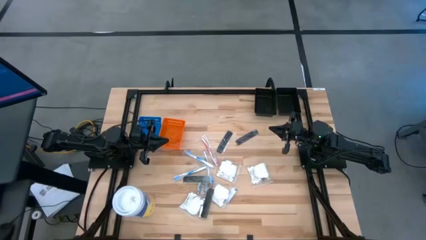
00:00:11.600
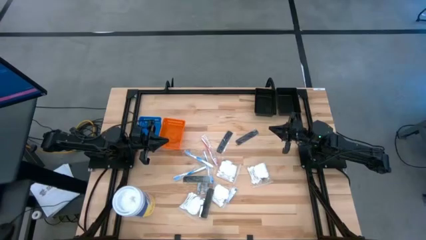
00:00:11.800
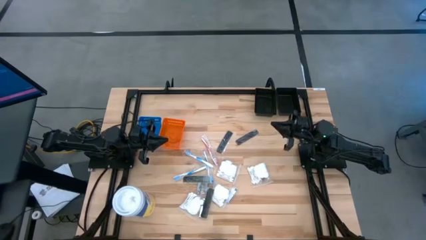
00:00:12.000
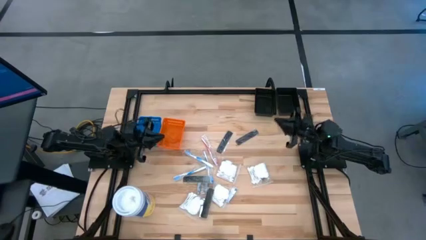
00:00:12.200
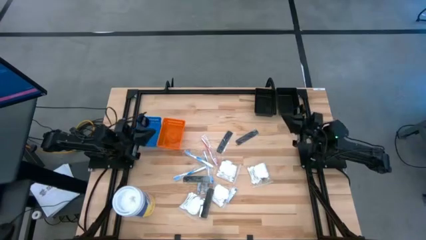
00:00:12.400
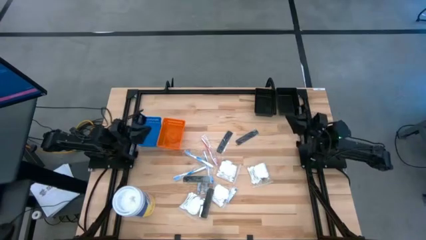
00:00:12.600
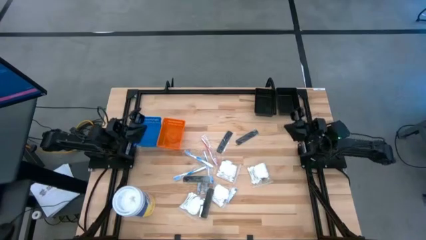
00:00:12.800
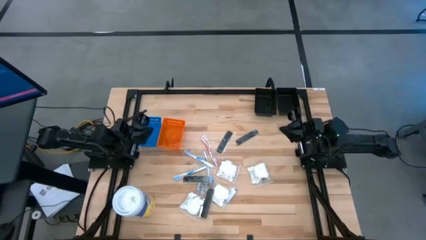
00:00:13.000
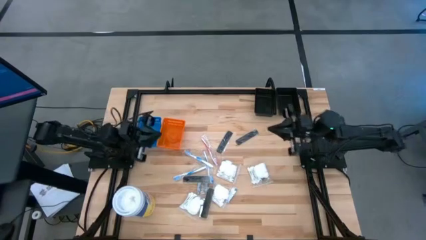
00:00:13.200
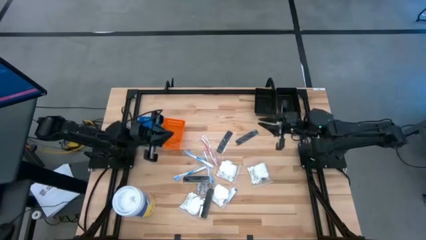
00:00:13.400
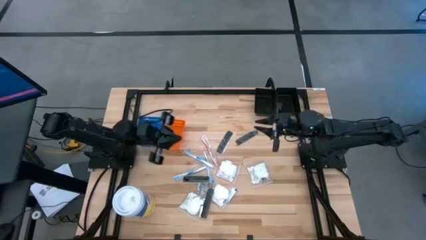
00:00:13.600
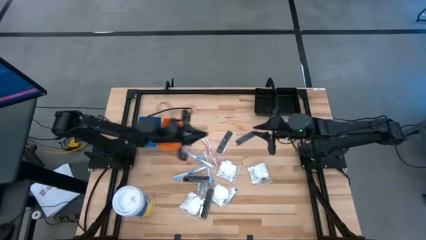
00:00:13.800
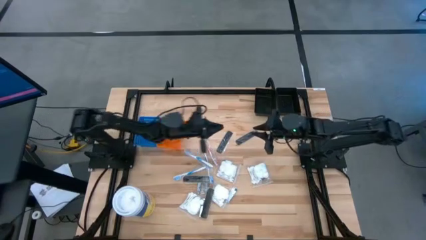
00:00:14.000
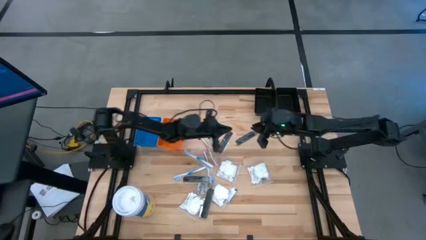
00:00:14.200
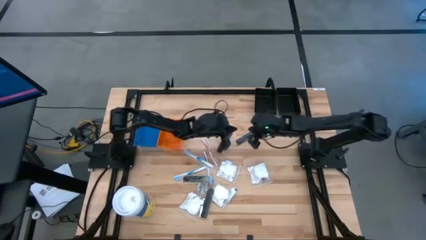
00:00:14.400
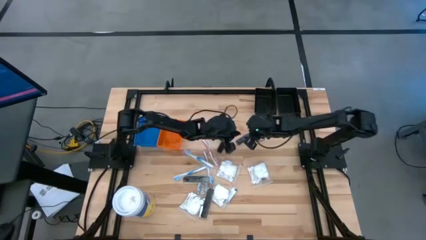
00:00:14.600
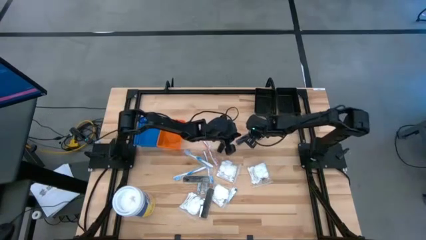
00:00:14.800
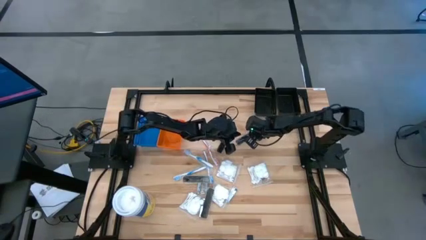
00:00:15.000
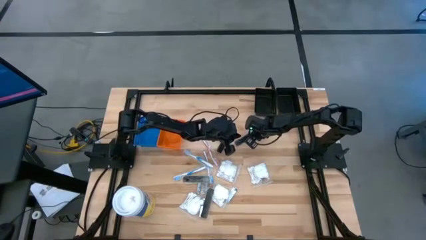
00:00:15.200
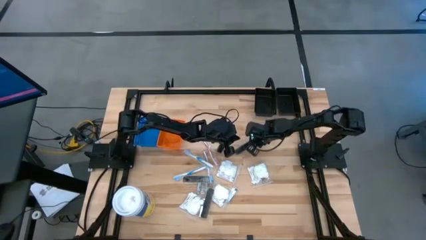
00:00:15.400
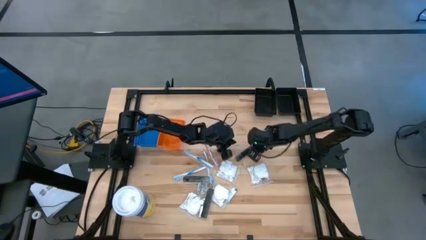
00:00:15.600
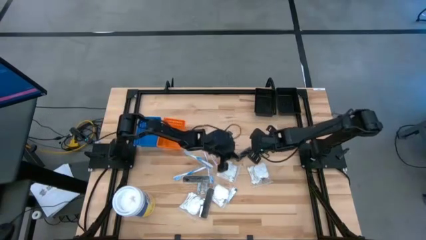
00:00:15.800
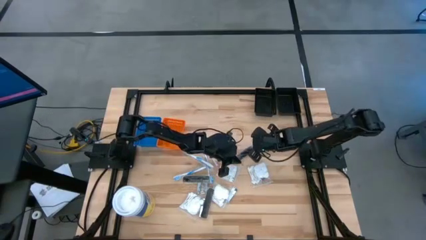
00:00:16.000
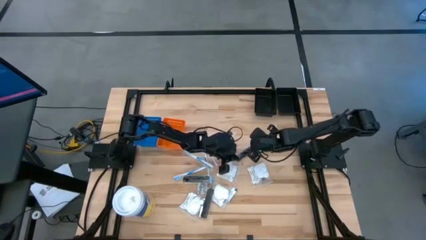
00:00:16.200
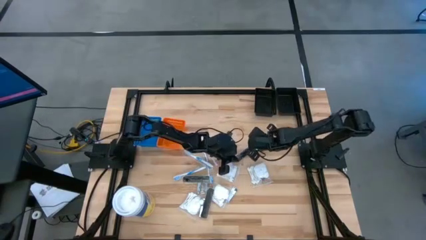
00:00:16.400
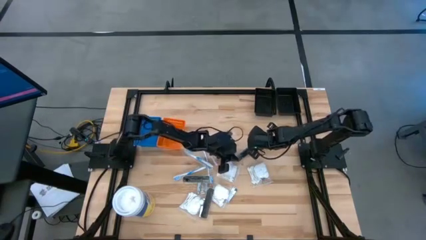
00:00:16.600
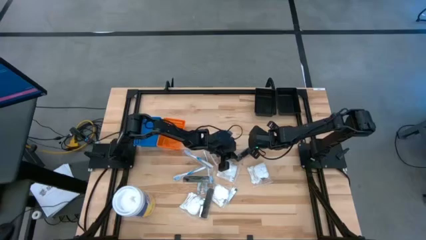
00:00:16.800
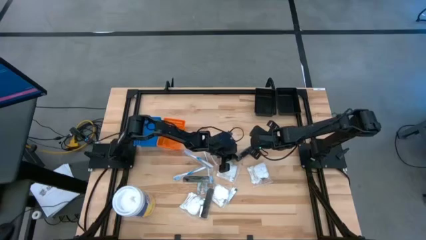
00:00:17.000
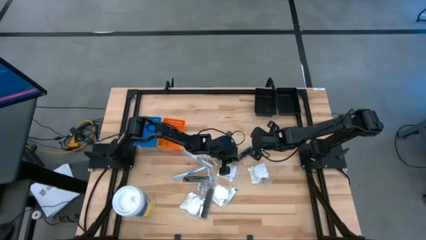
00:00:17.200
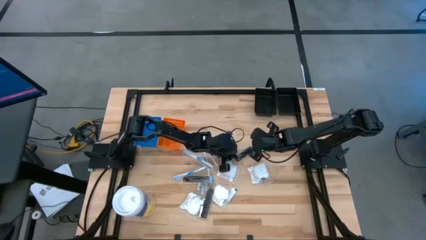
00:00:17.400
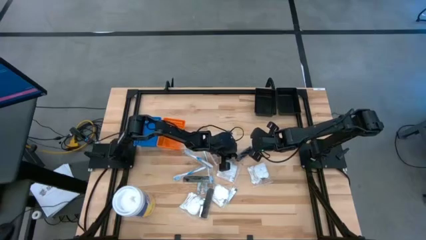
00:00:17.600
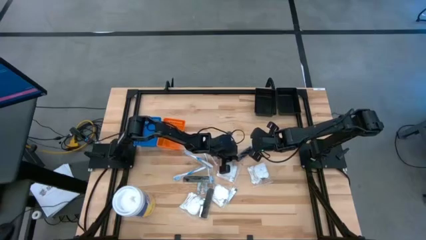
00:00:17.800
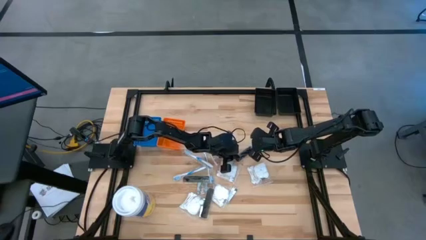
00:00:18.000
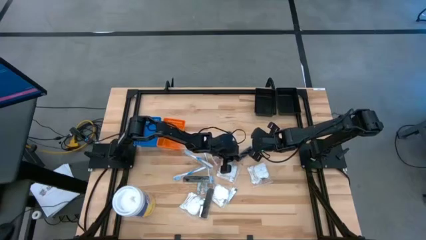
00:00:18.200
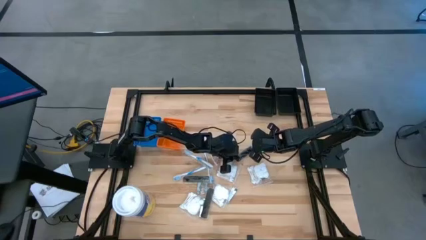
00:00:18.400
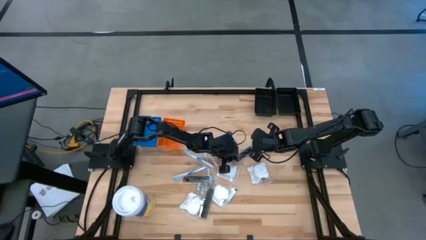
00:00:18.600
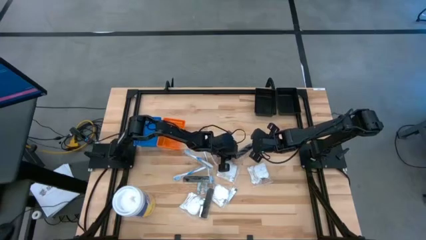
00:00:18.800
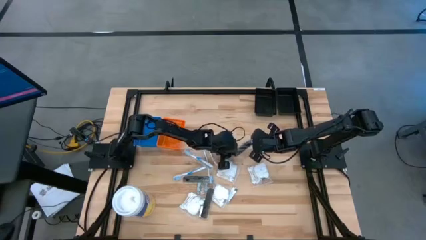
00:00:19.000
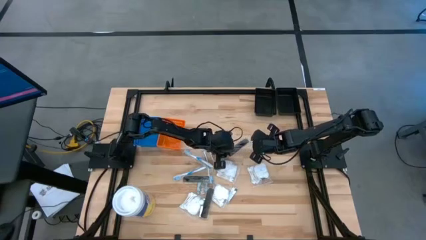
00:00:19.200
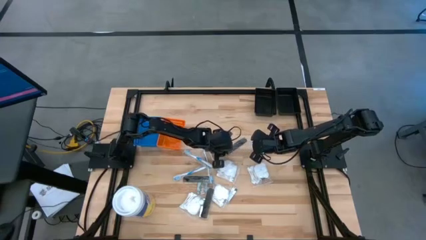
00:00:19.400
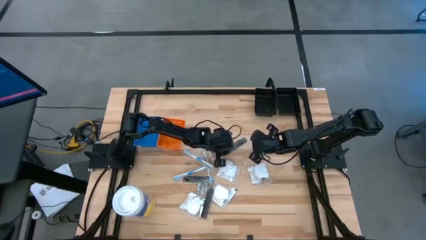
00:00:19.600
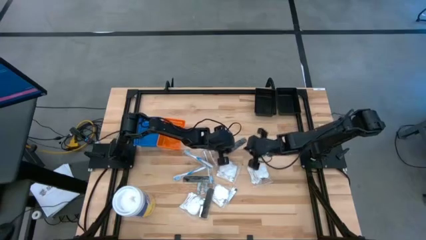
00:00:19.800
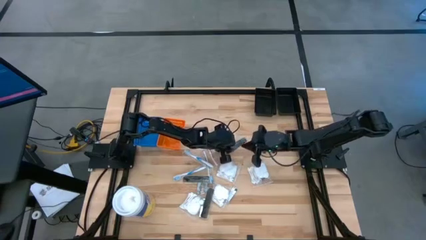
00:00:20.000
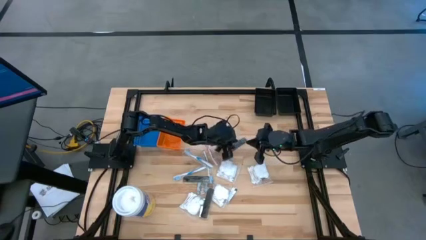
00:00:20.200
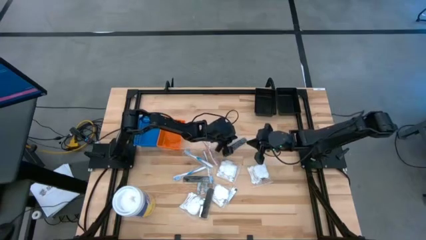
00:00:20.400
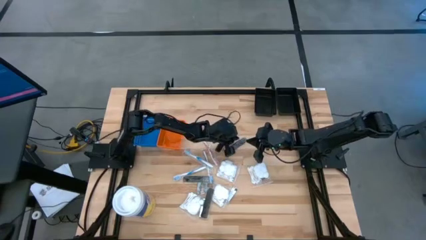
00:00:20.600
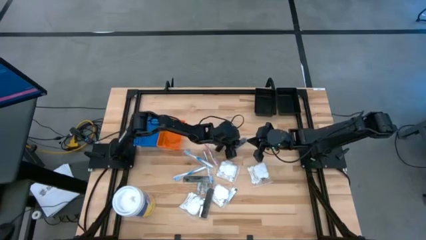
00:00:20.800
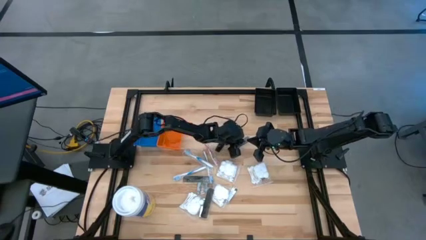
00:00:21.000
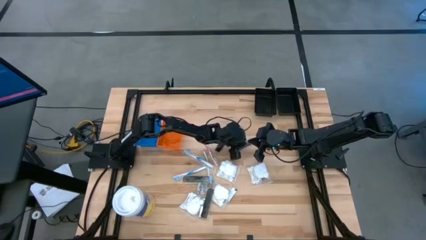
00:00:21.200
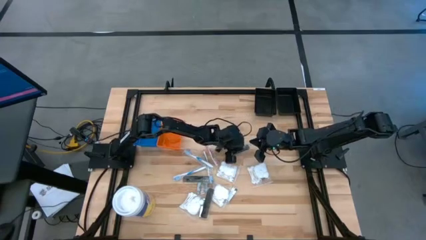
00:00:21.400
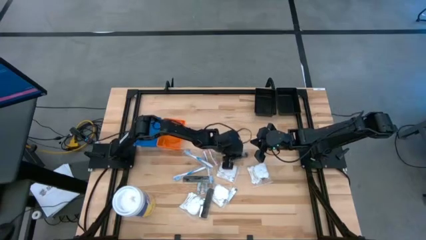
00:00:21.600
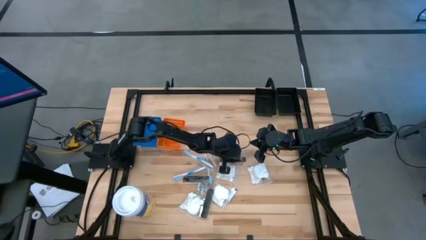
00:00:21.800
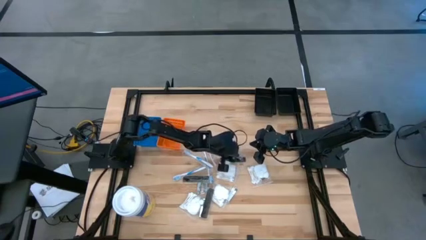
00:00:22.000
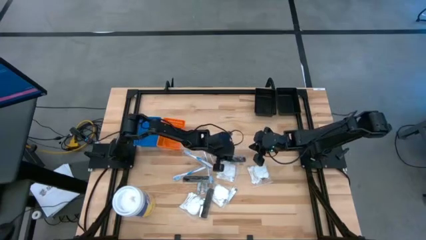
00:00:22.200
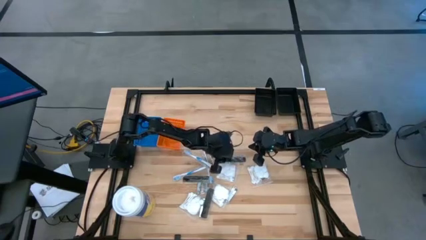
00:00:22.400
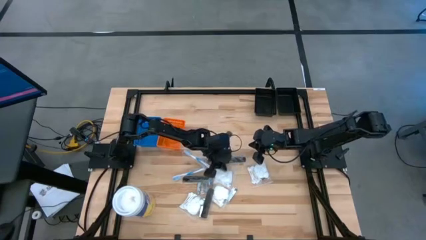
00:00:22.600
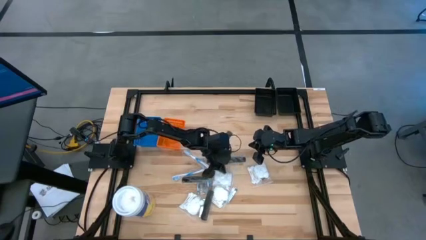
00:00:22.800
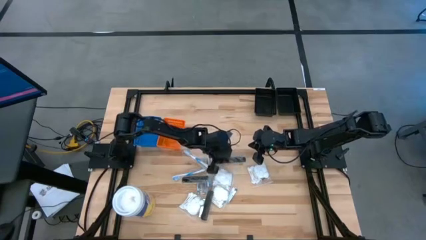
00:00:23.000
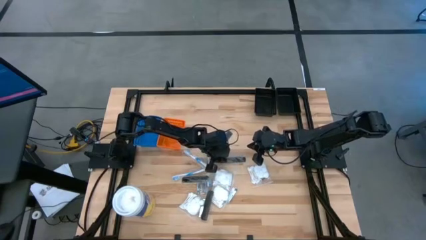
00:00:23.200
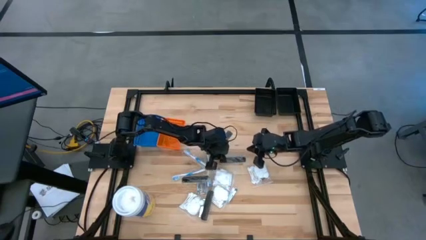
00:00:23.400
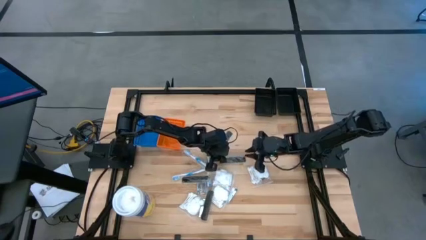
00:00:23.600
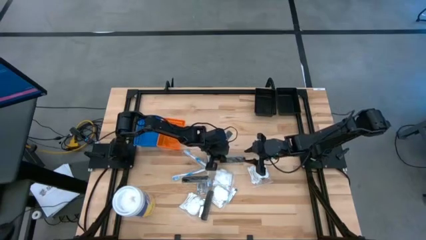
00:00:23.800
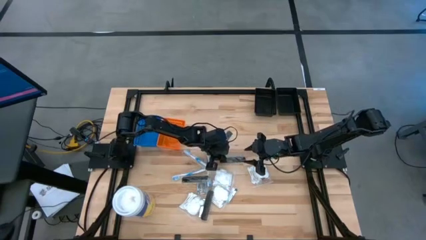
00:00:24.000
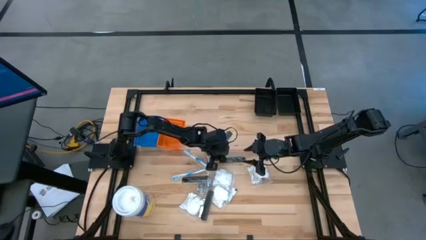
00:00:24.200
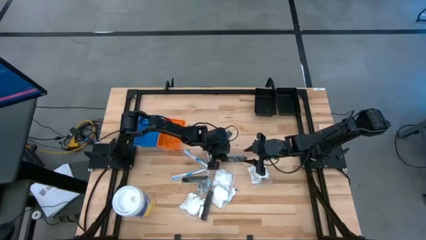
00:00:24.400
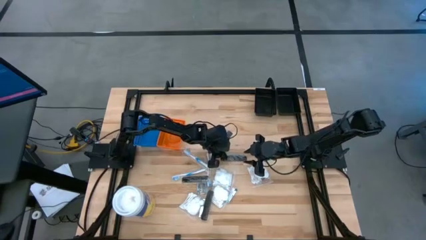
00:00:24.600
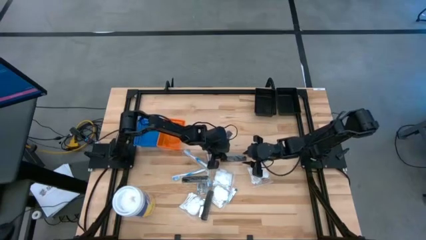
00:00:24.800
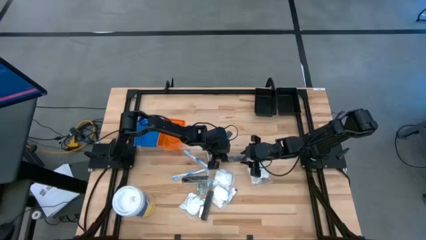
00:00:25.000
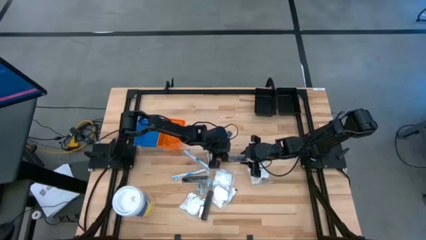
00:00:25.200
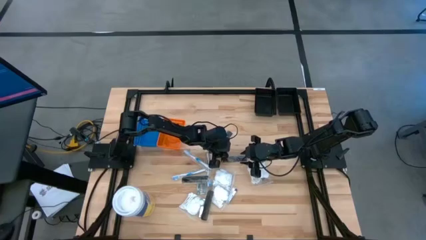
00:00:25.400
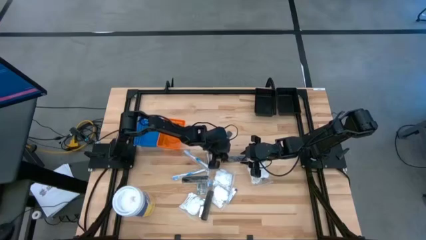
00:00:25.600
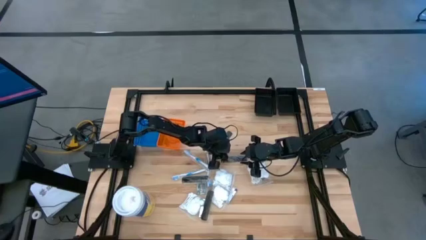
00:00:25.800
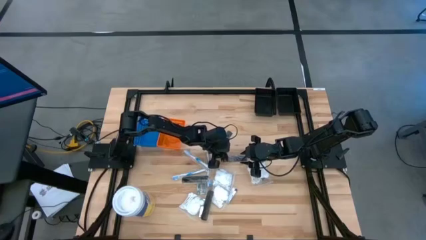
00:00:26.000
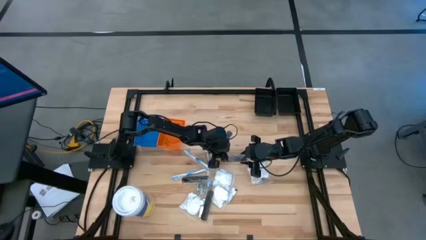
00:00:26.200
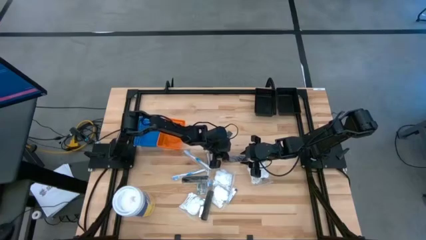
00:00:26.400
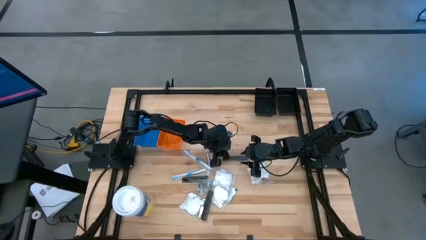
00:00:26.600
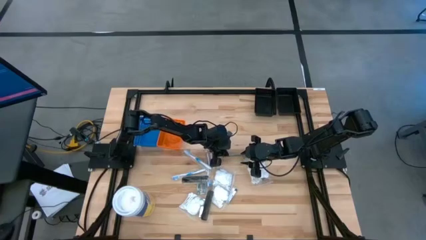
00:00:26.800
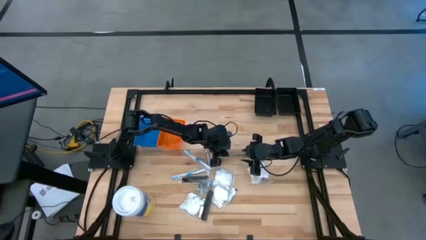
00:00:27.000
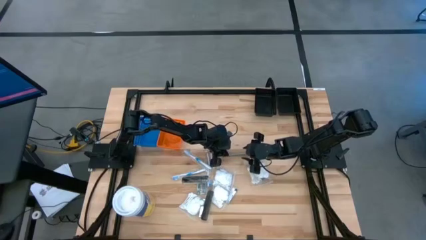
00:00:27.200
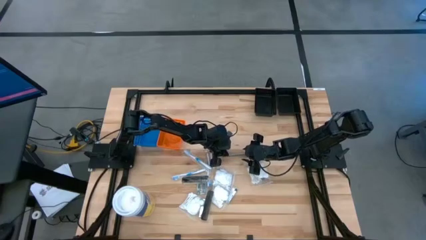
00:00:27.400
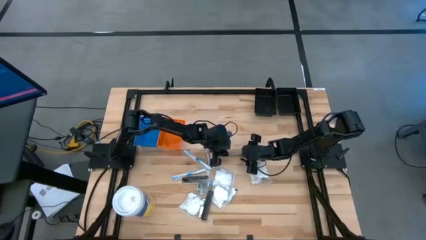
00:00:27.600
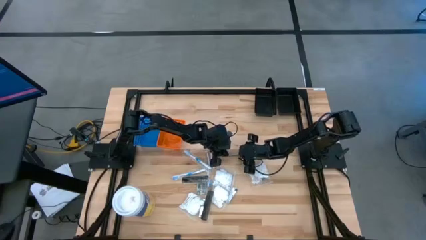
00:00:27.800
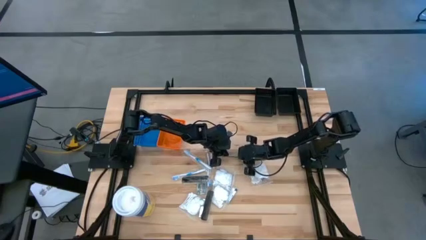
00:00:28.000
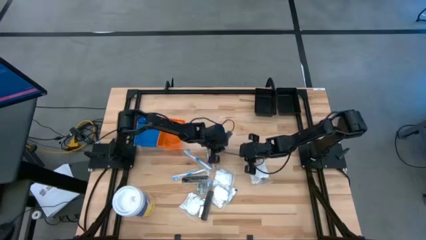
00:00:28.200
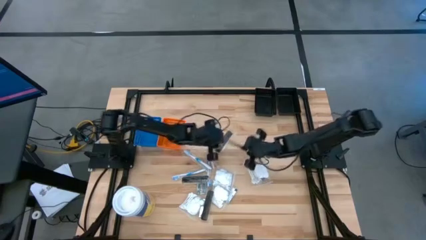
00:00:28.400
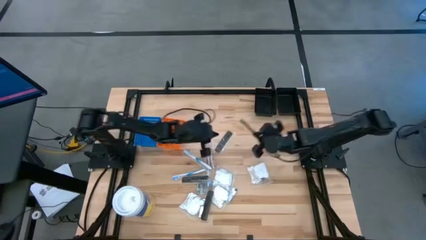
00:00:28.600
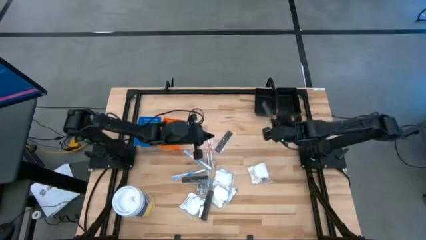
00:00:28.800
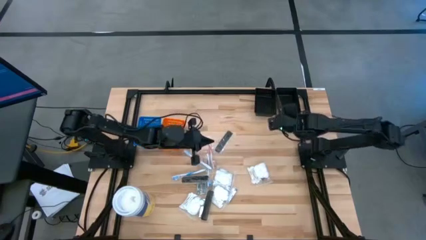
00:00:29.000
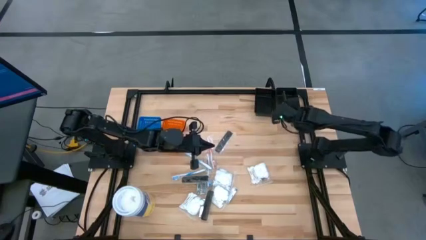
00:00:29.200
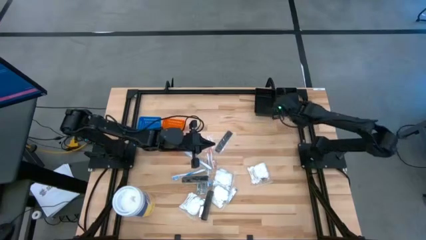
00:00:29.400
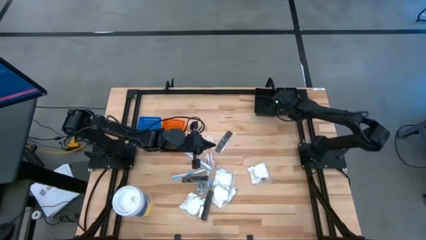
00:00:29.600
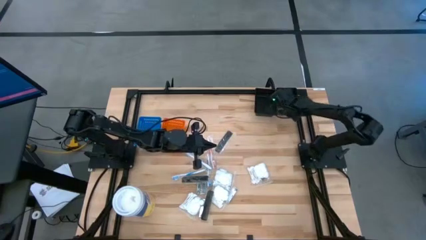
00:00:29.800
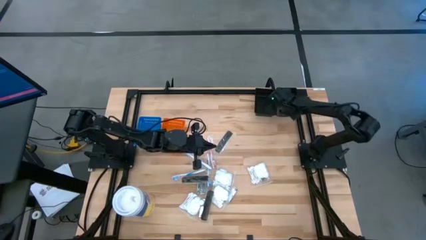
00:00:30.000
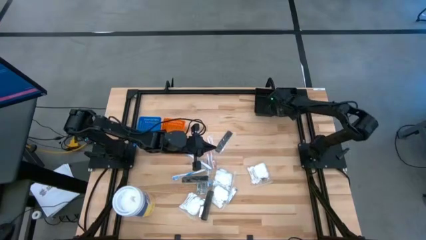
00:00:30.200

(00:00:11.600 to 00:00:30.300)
Task: Pick & Place Travel size toiletries
Put the black comb into the right black bin
